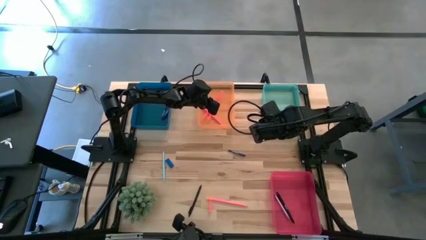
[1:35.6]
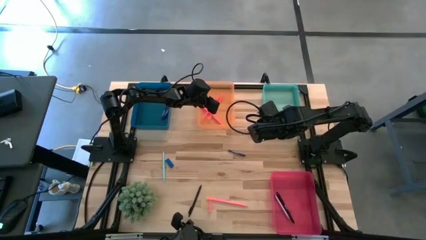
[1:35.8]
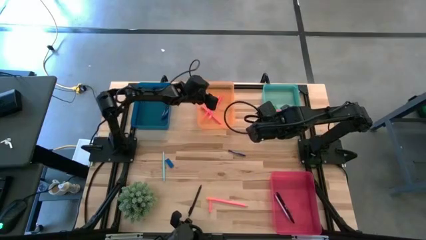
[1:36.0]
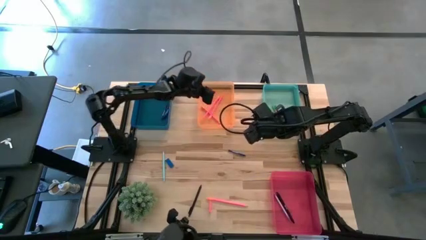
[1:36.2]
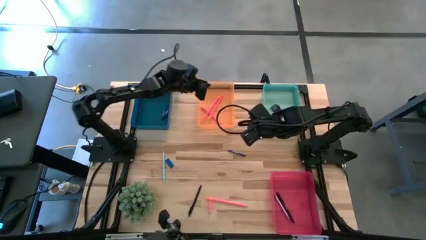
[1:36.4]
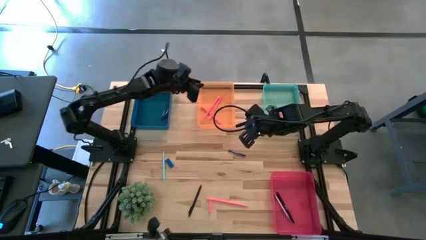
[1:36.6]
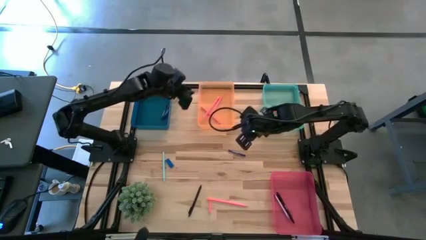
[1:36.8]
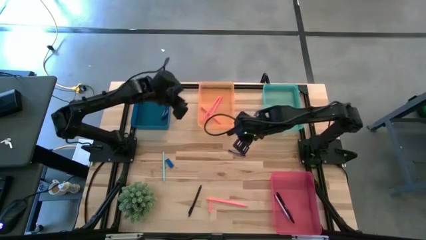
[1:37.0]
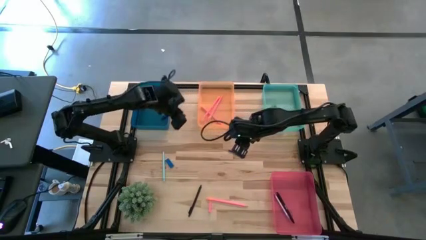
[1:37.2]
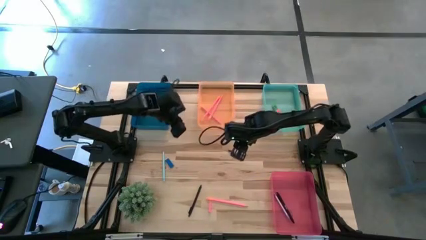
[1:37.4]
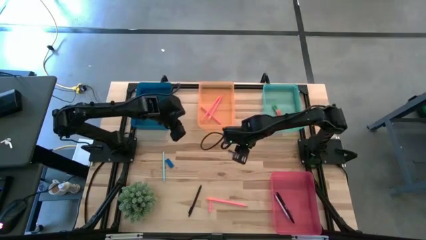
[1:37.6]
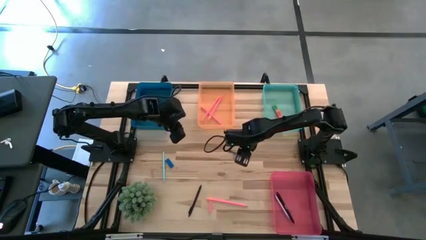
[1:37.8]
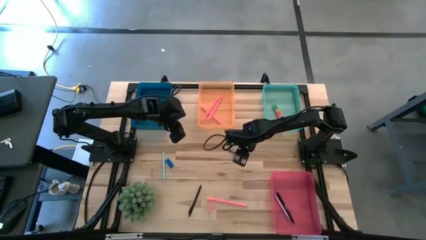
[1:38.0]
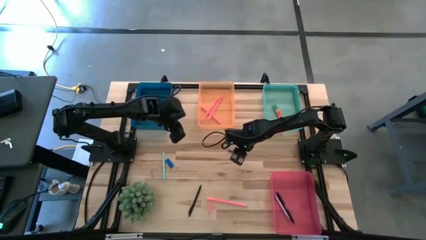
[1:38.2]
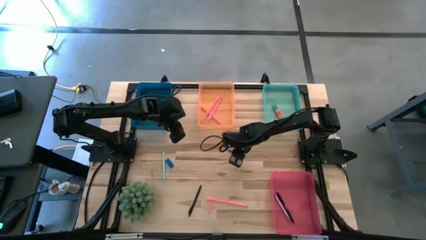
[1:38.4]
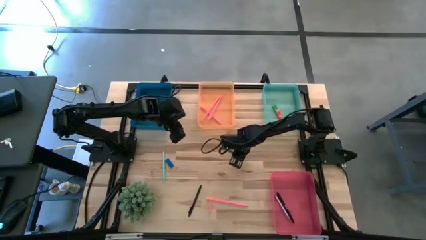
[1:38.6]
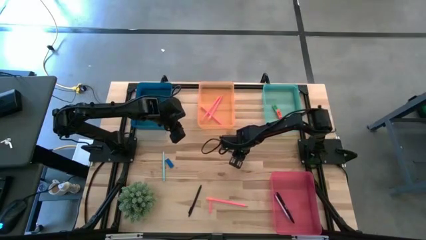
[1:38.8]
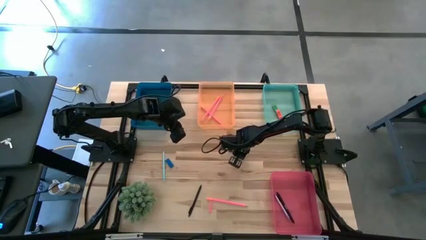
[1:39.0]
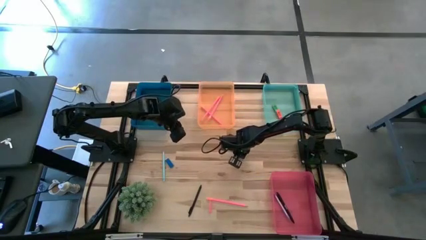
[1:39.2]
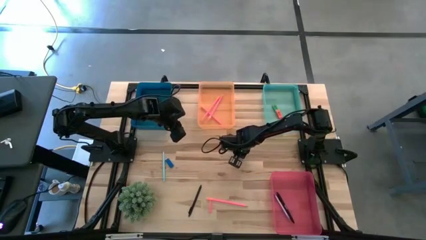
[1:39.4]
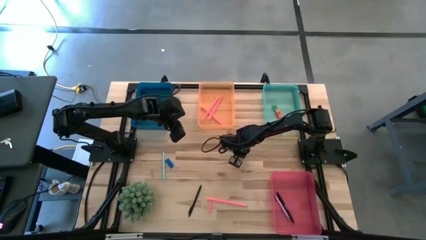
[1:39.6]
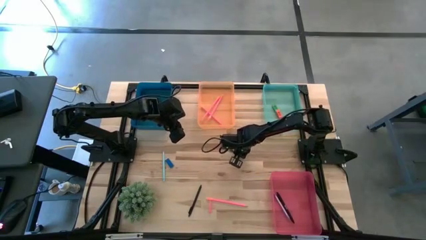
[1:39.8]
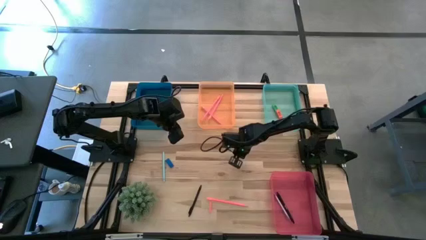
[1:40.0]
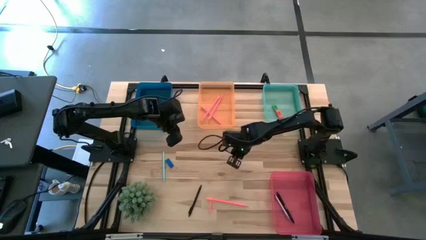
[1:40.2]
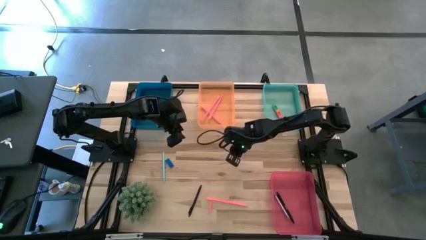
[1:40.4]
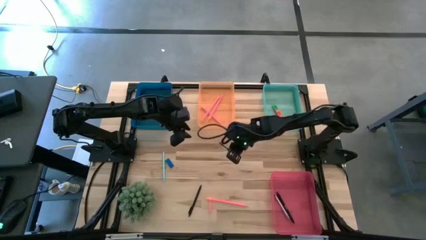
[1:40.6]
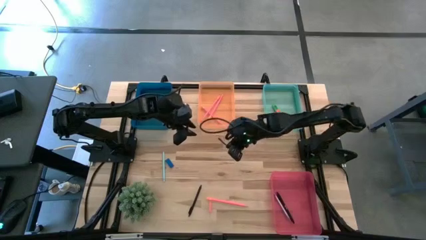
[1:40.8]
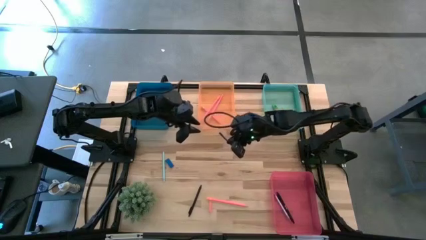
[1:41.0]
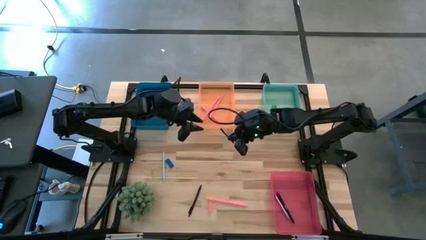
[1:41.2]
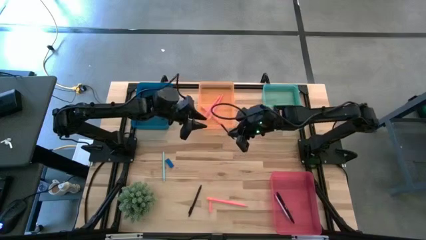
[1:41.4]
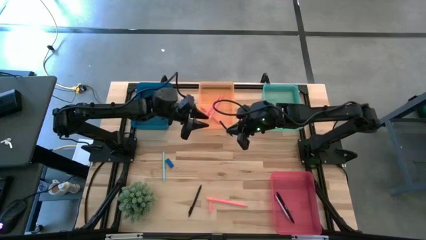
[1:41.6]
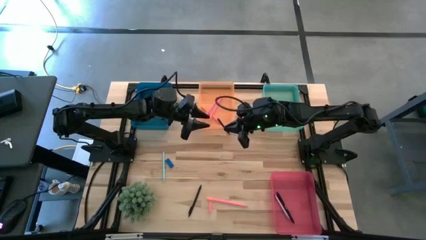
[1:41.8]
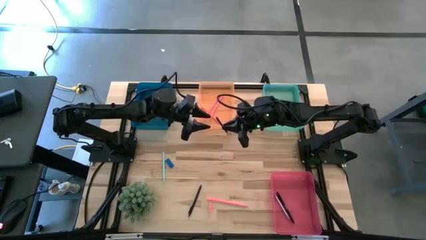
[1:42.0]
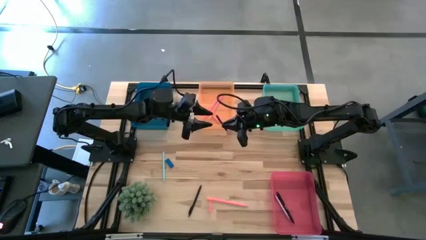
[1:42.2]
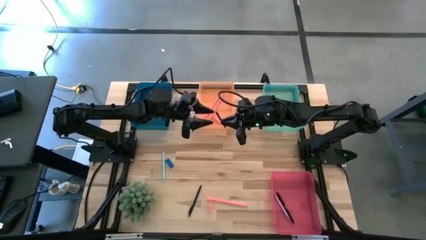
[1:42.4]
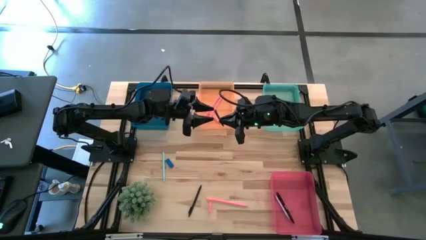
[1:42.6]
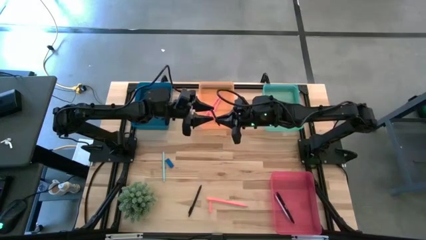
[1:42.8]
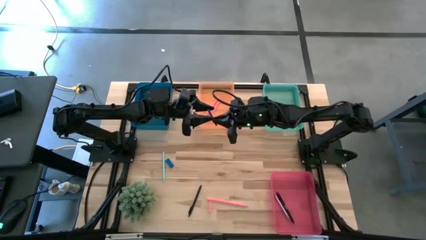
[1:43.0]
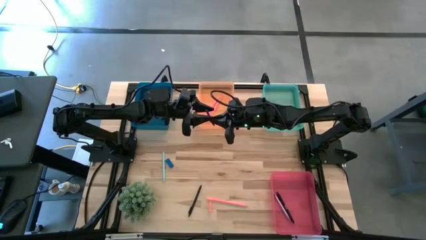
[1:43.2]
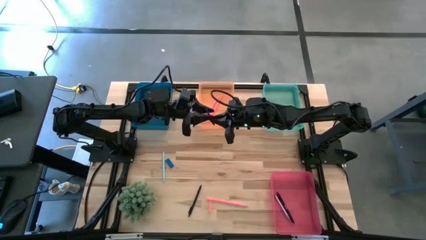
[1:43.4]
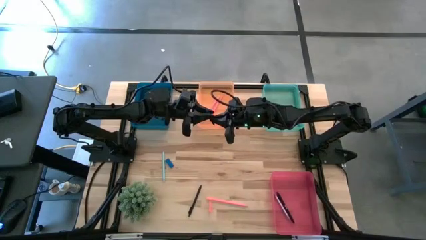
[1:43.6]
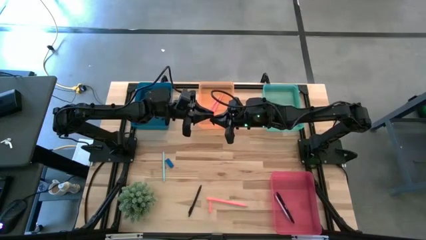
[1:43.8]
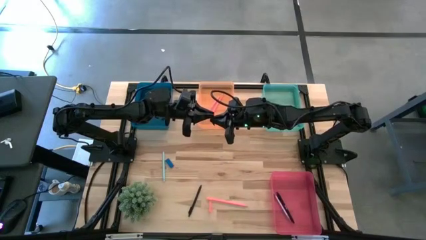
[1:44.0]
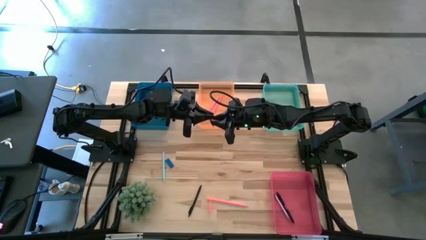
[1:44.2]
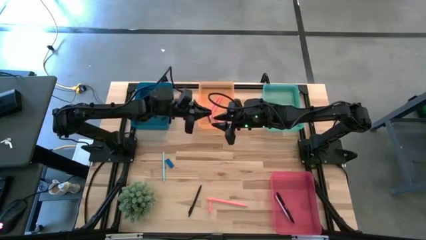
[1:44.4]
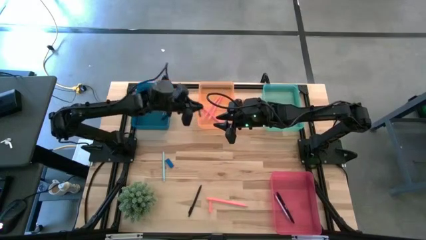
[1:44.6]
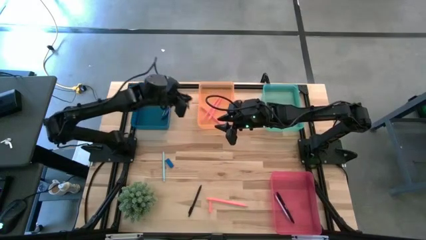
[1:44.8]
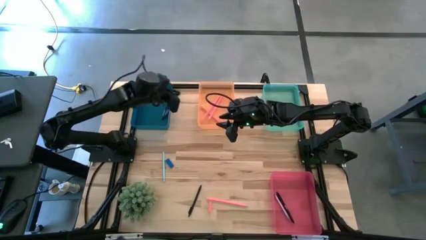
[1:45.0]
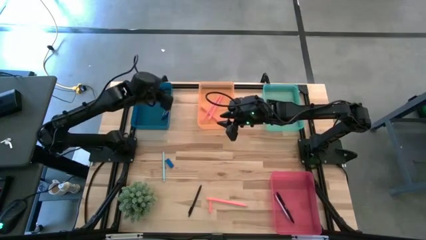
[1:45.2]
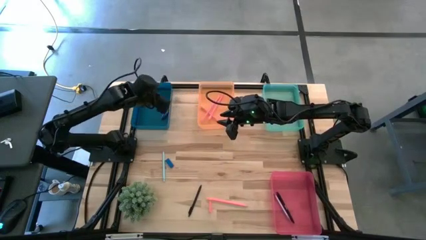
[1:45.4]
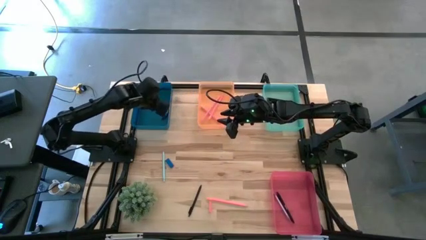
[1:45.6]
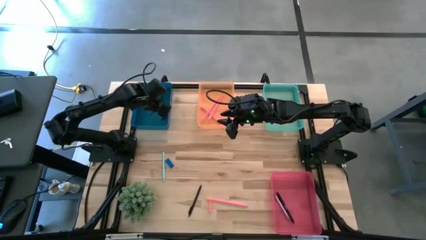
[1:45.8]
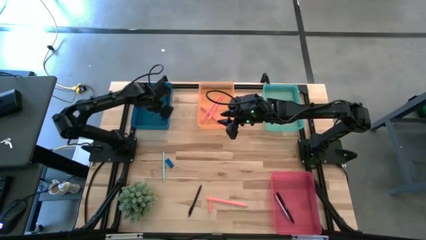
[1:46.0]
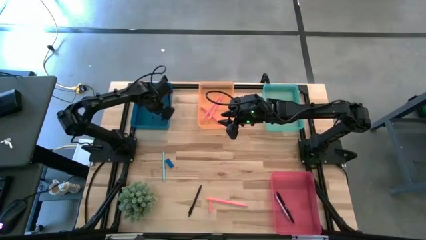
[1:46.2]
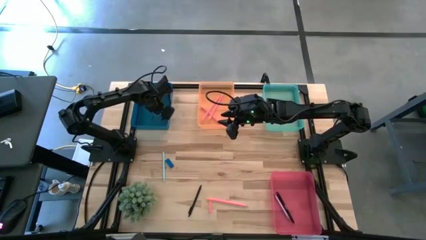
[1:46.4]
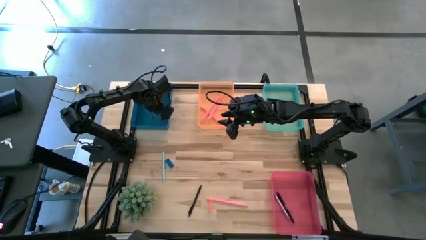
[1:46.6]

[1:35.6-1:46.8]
Task: Sort crayons/erasers/pens/pencils in bins
Put the blue crayon into the blue bin

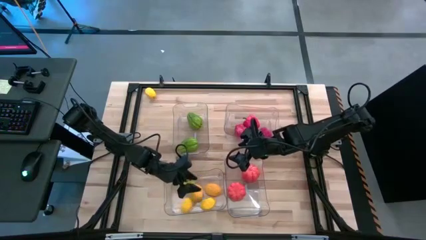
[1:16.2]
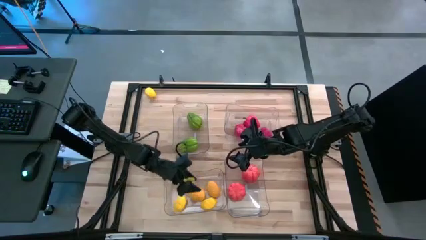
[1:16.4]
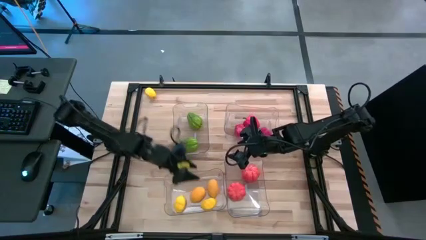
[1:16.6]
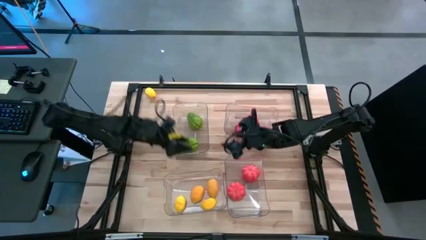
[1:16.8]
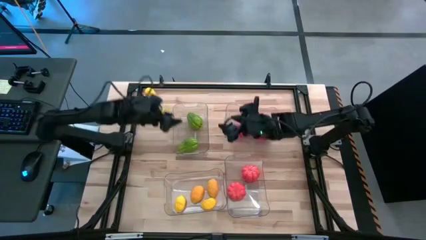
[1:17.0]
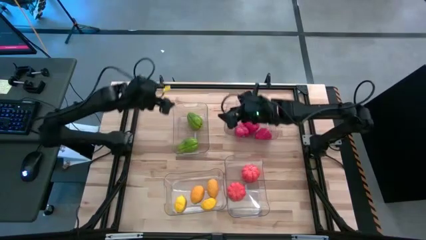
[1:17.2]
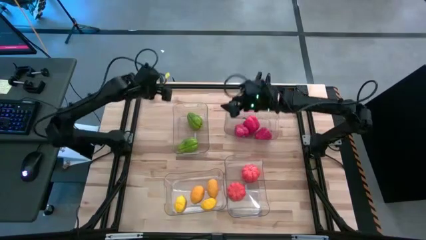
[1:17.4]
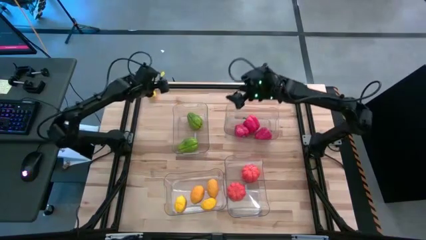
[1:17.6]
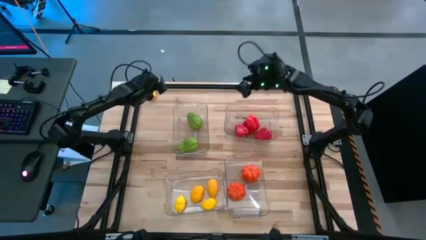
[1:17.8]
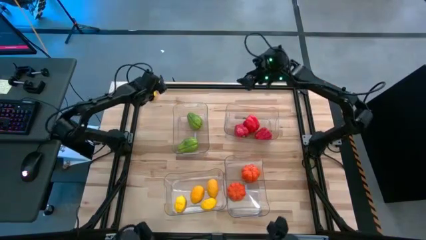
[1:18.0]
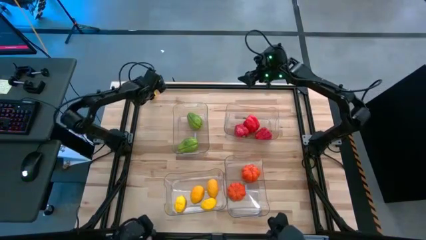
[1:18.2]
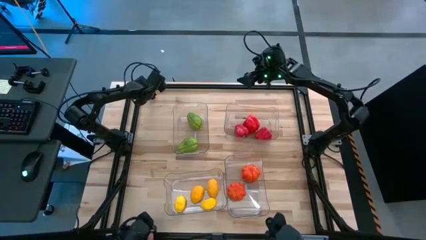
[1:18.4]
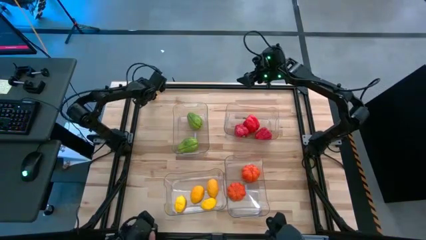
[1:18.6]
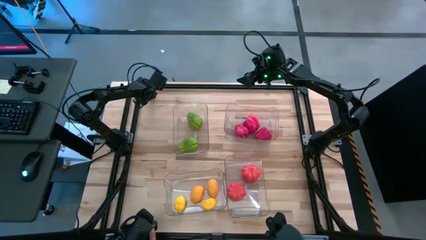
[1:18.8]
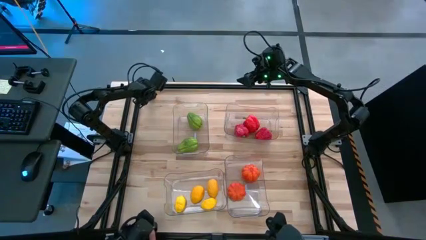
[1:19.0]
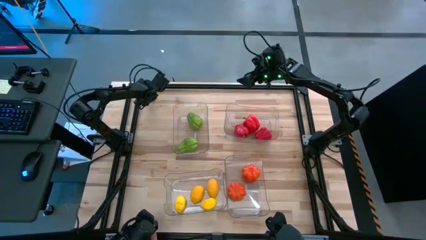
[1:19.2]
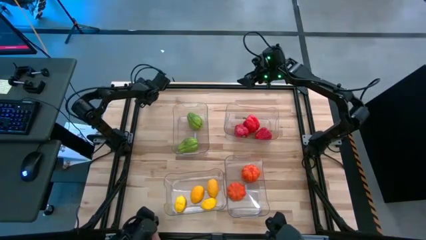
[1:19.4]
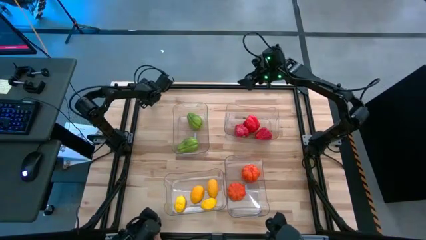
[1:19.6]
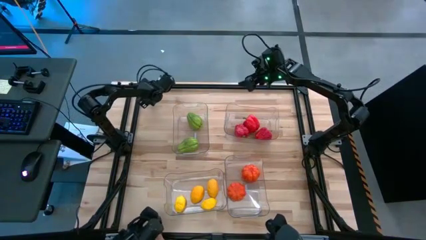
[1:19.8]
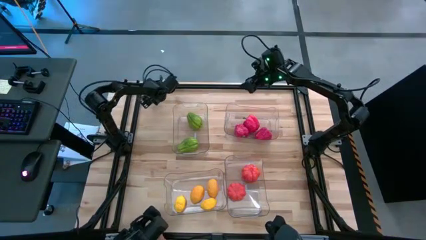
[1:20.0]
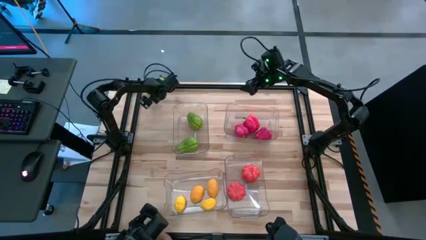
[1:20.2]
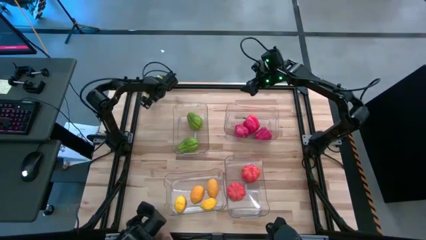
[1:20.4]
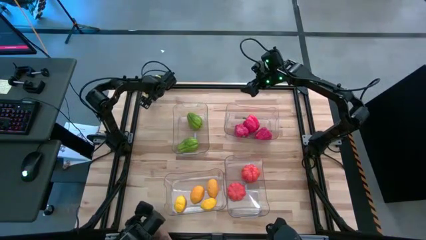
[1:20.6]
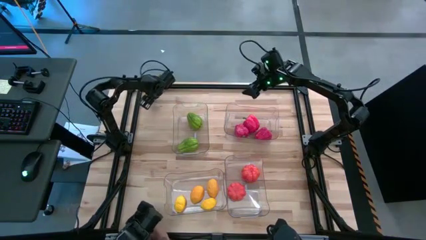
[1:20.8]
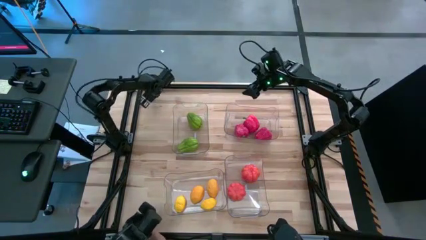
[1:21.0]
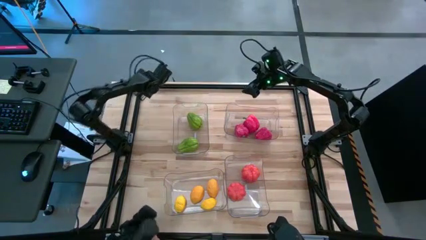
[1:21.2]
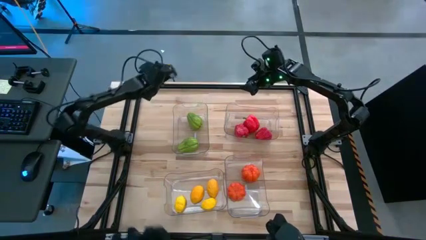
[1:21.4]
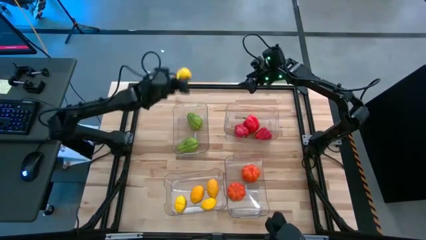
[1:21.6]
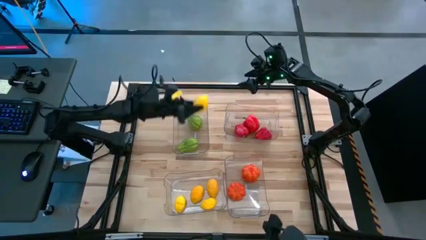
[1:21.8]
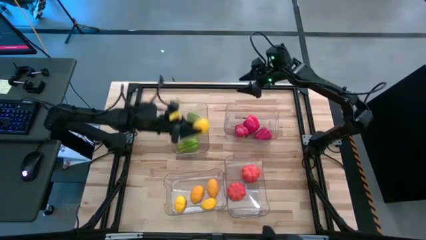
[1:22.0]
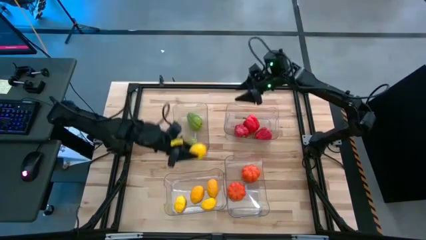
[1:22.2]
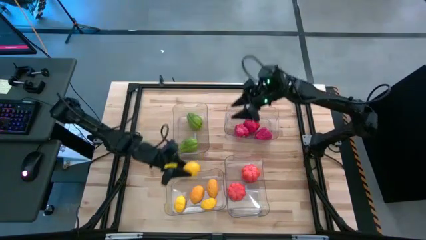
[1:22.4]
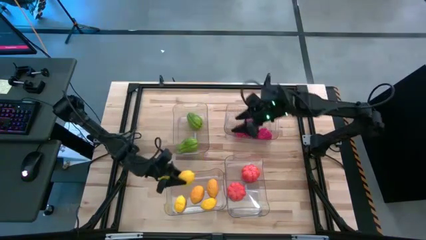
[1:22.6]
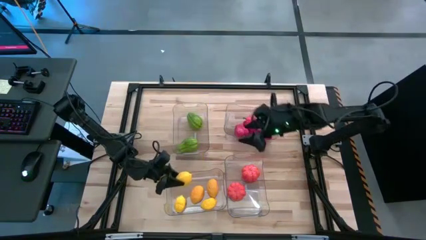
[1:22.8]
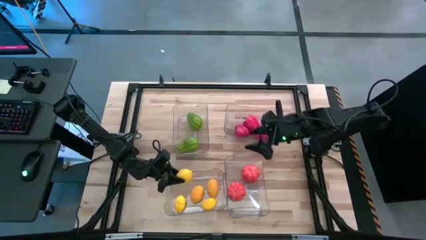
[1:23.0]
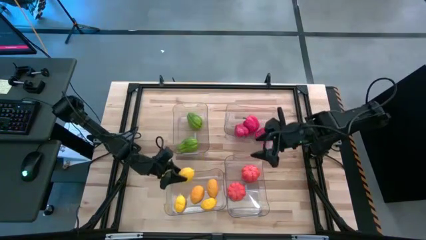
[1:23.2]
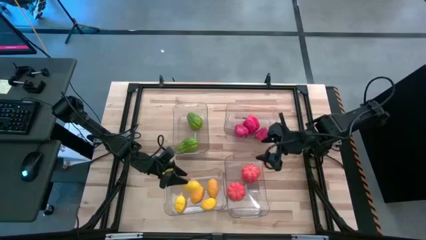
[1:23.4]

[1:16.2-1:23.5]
Task: Sort produce into baskets
Put the yellow lemon into the bottom left transparent bin
